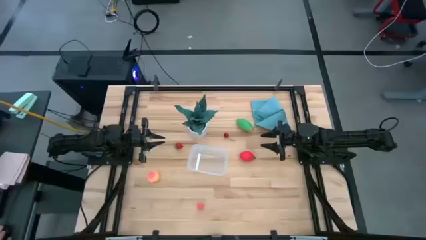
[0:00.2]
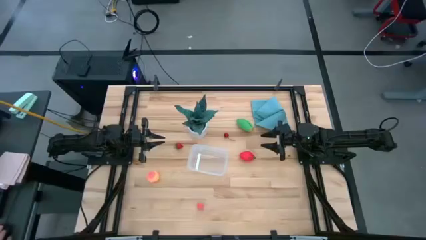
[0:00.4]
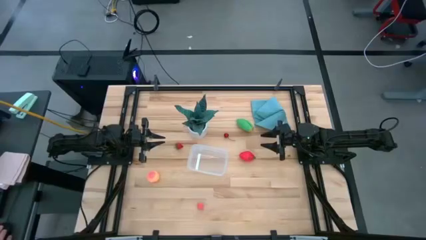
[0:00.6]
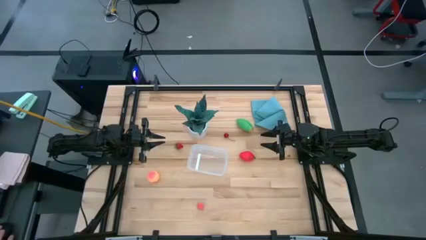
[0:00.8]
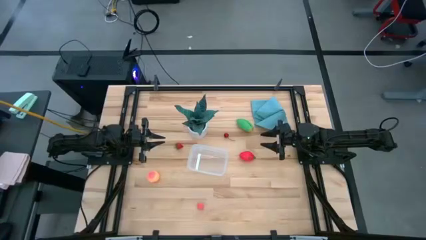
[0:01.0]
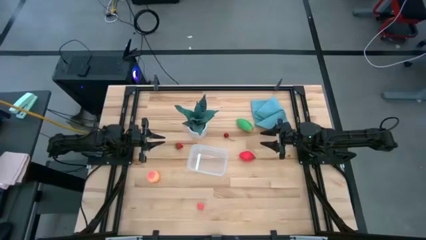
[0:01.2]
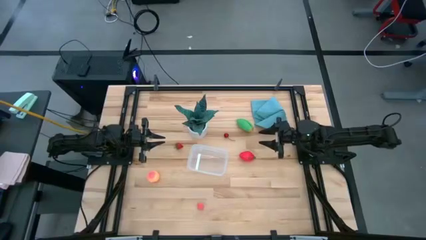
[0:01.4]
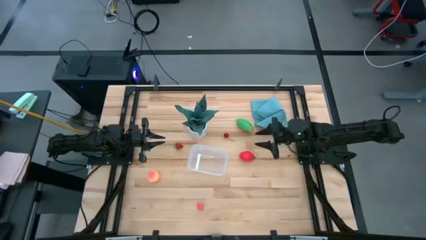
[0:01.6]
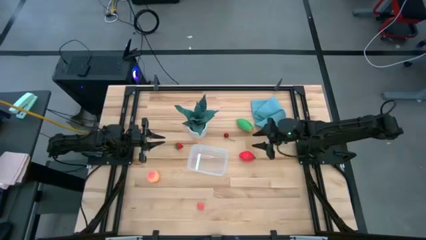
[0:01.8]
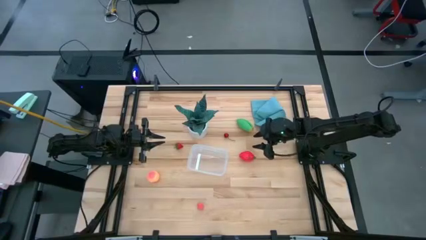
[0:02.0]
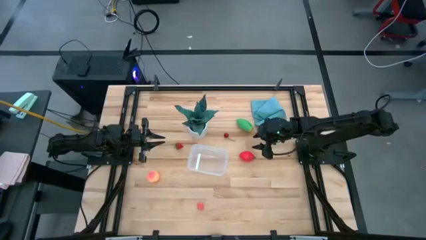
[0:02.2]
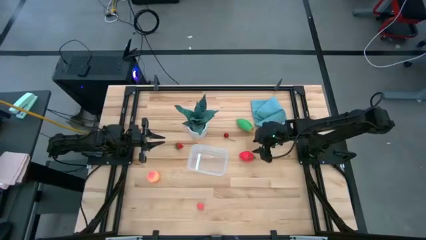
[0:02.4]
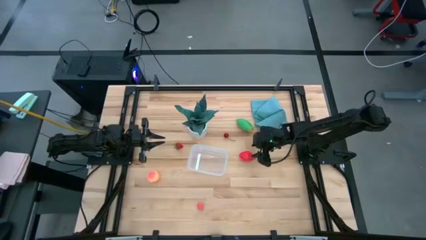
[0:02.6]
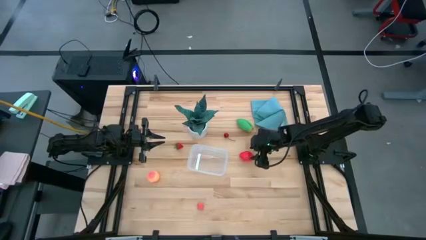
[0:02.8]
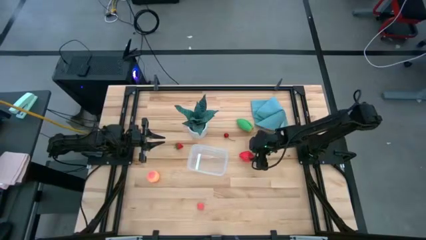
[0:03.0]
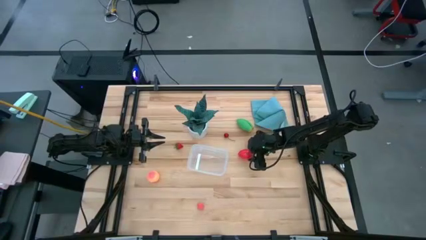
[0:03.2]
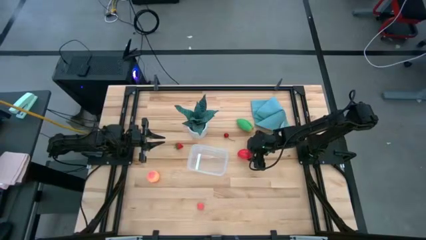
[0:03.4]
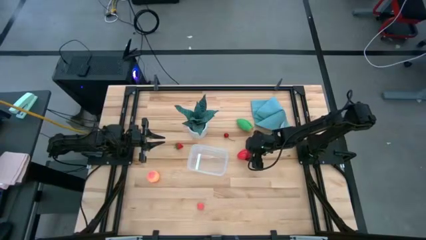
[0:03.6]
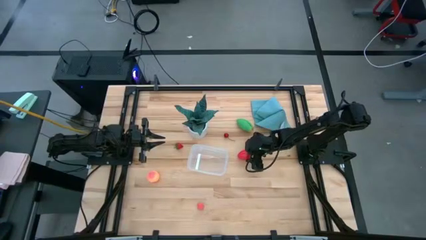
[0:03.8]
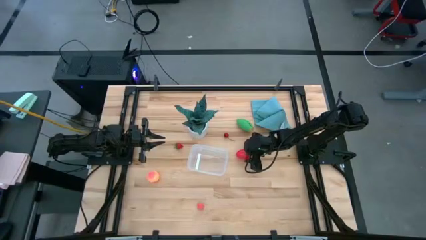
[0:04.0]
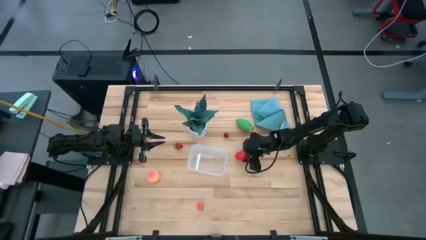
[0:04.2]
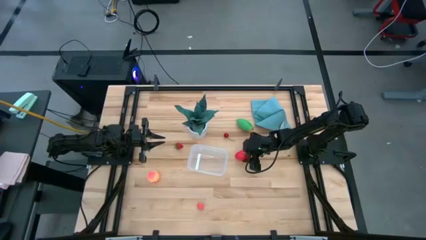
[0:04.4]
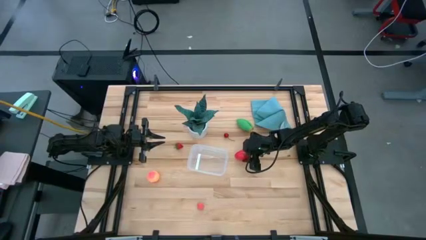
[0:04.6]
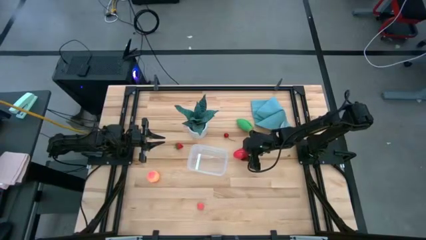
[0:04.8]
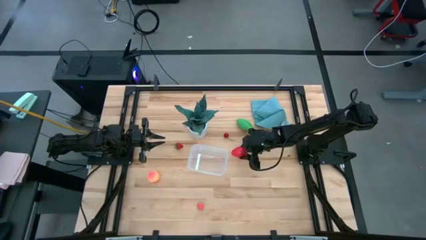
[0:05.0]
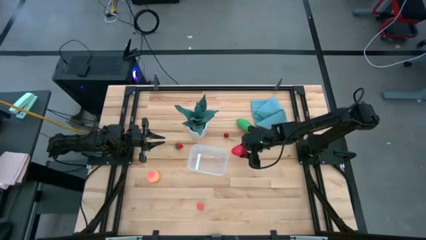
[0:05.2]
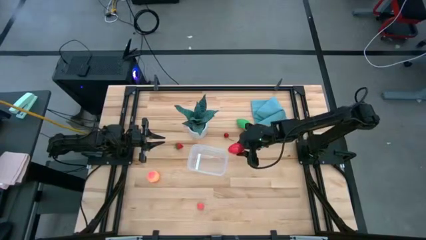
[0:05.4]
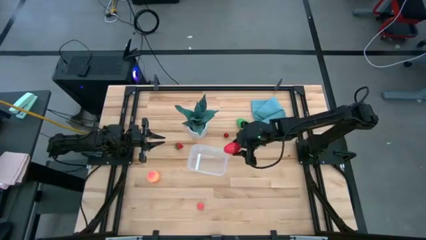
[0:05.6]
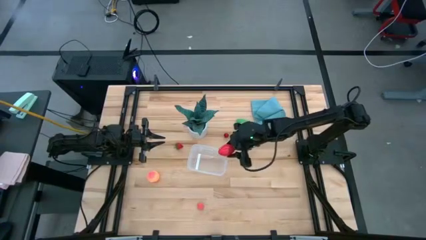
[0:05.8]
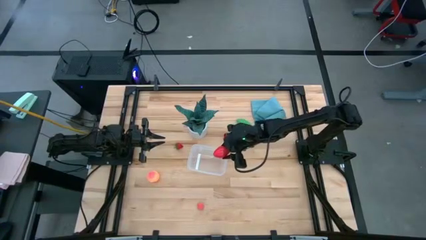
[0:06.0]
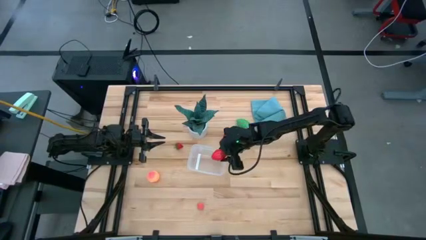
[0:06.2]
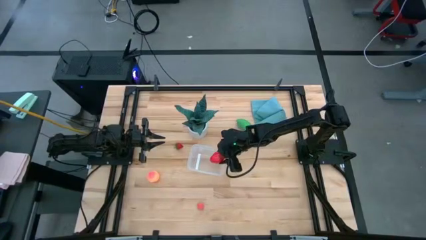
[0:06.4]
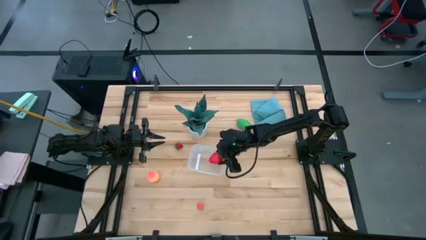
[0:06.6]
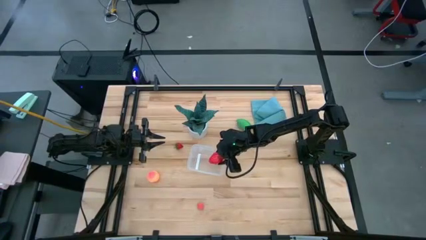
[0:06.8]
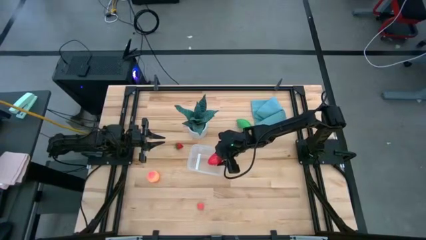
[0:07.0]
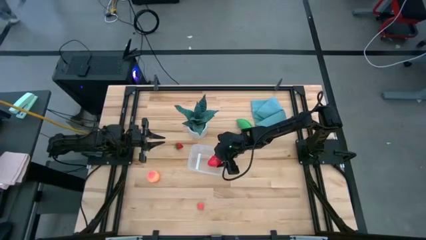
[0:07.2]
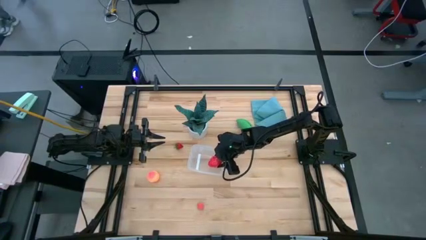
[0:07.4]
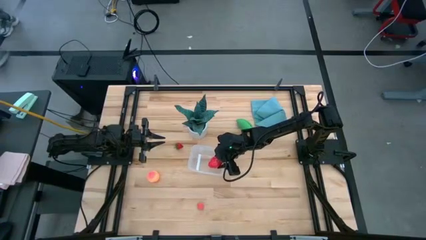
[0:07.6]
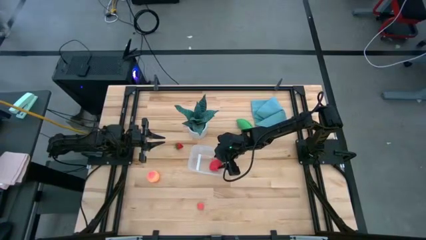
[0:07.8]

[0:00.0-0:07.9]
Task: Pick and placing Produce into tupperware
Put the dragonfruit into the transparent container

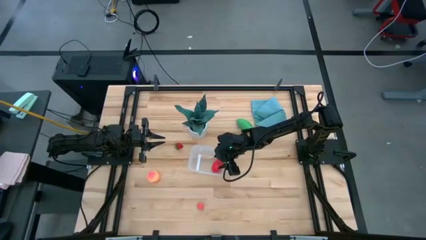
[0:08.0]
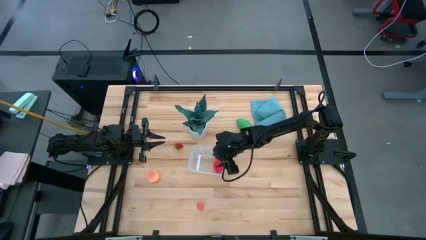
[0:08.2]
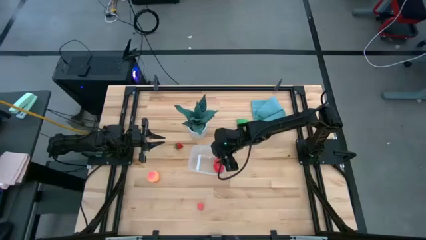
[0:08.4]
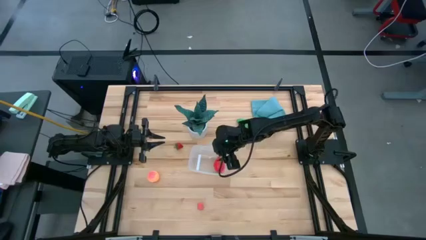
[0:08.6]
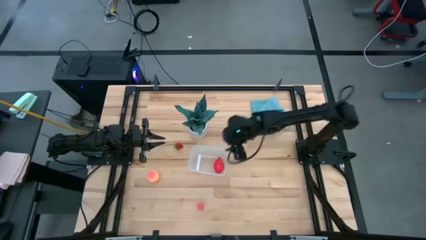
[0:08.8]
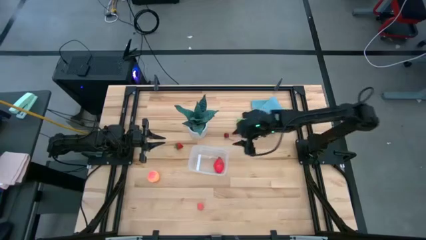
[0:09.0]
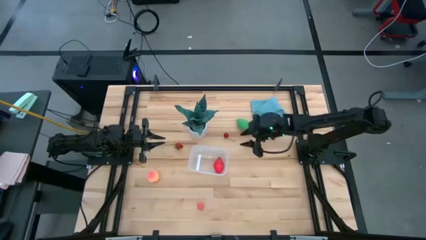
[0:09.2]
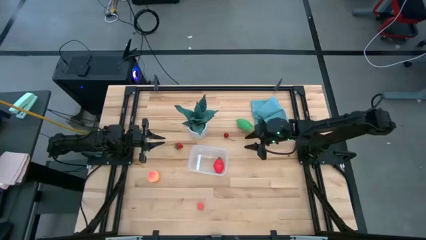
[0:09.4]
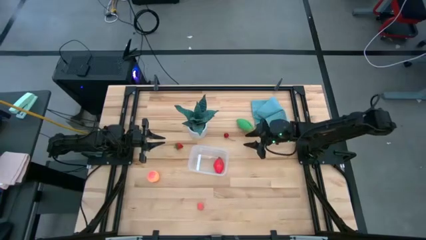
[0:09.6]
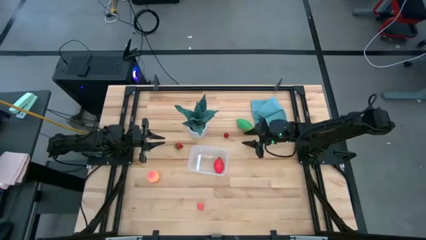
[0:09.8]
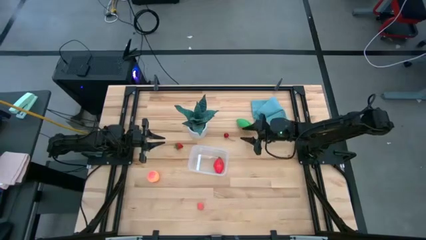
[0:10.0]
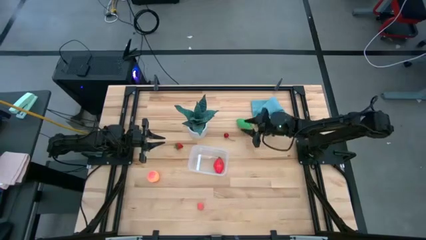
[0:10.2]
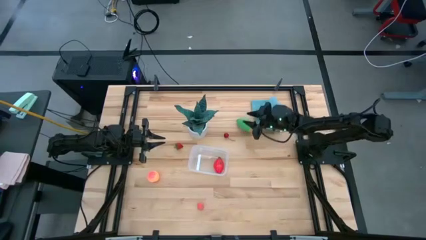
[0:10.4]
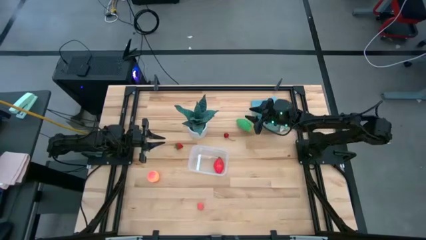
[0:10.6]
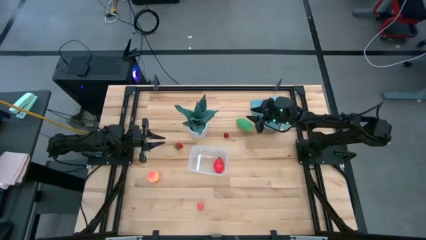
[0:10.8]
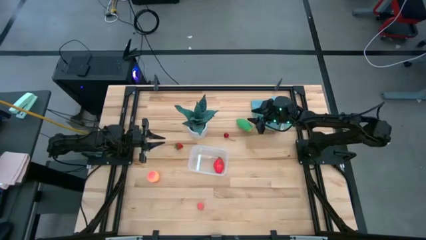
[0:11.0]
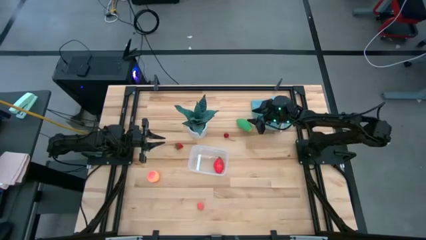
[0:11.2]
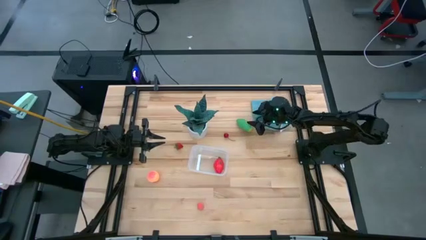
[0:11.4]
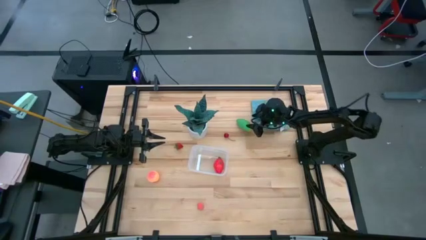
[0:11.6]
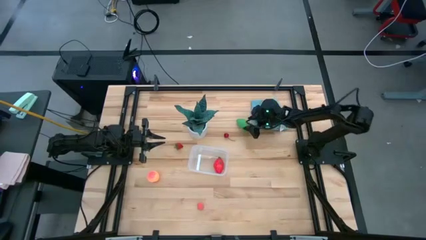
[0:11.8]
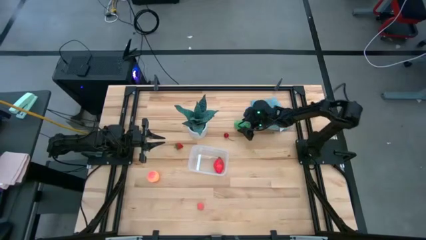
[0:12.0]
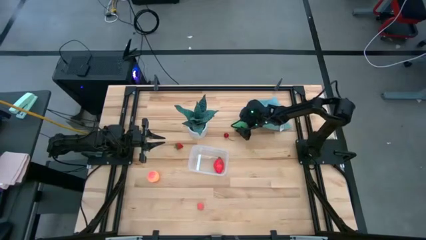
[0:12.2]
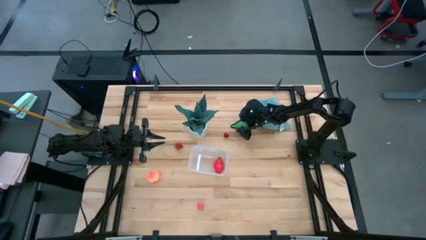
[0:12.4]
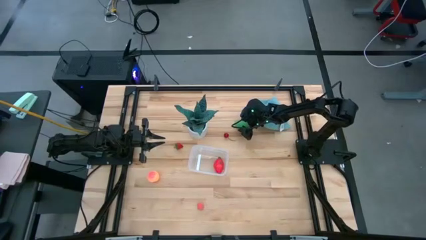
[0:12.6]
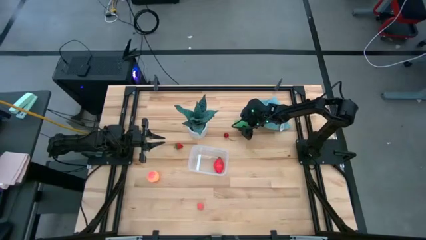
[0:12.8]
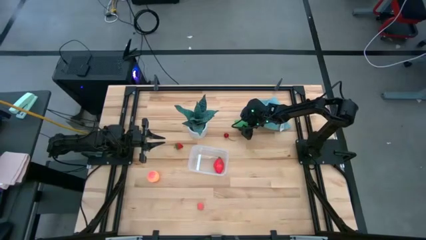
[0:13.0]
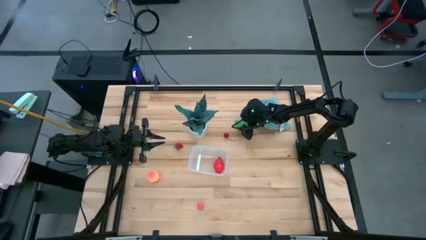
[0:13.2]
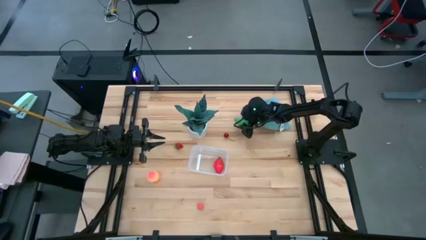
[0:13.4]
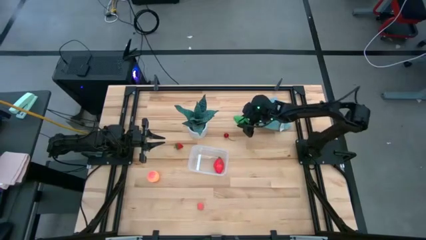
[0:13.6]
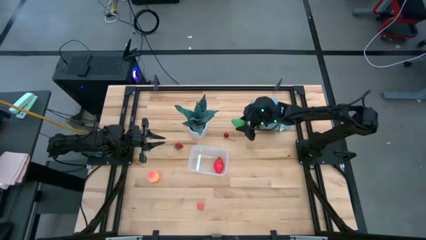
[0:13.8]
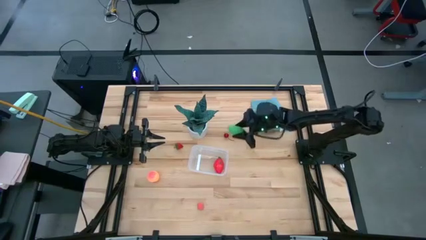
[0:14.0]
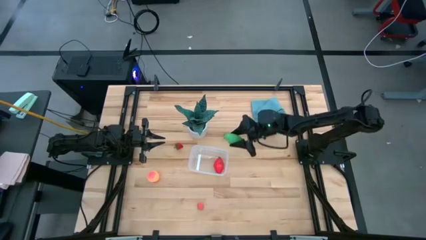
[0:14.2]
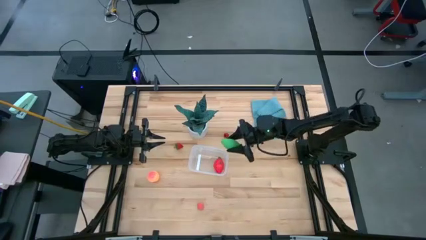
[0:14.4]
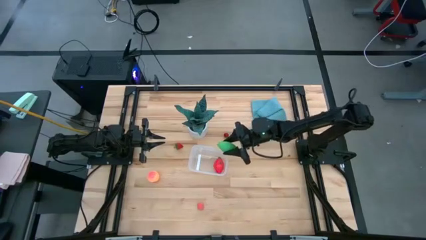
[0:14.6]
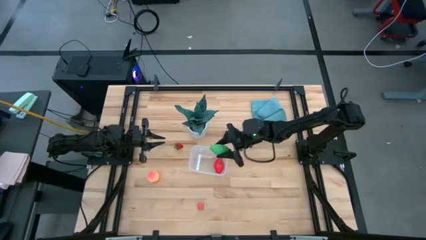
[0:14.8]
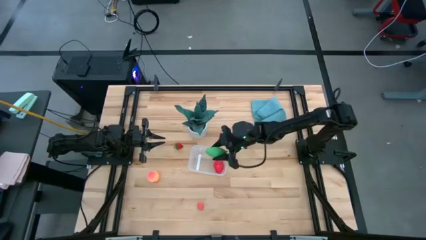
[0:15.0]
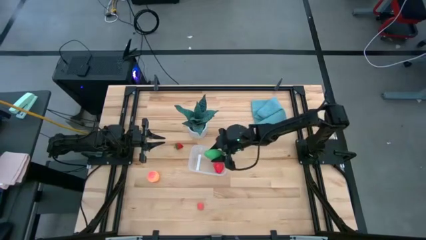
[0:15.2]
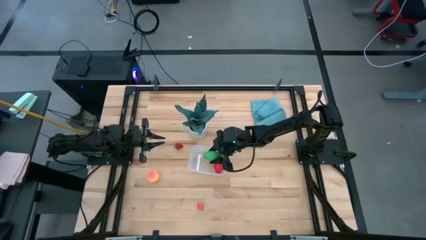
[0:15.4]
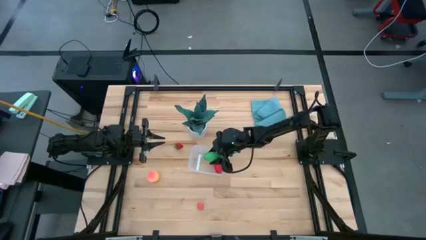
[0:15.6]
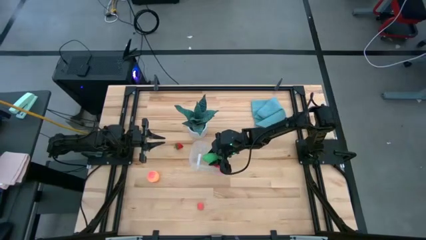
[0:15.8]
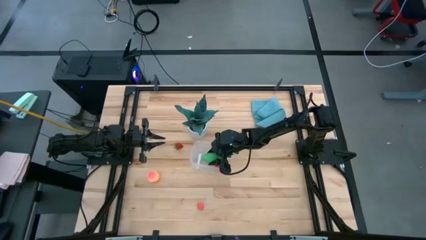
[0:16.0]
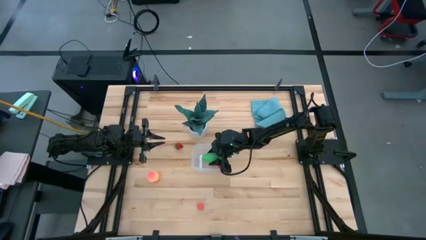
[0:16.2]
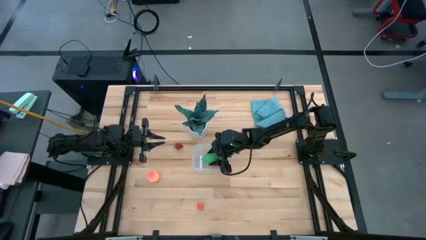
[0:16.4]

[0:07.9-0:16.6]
Put the corn into the transparent container
